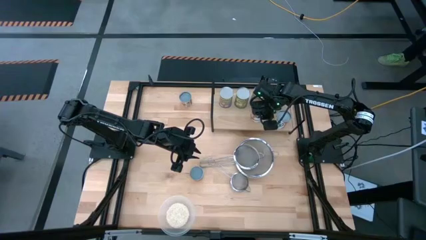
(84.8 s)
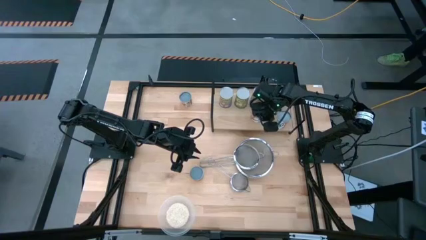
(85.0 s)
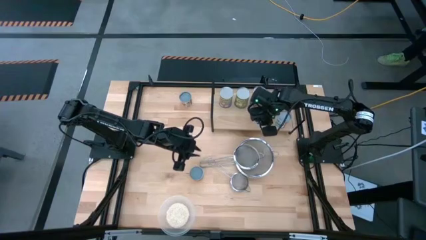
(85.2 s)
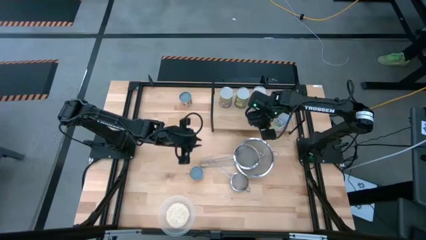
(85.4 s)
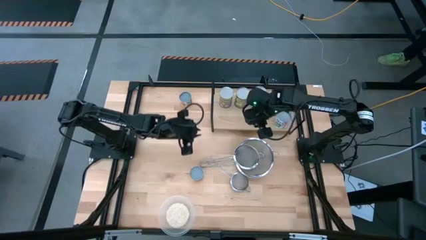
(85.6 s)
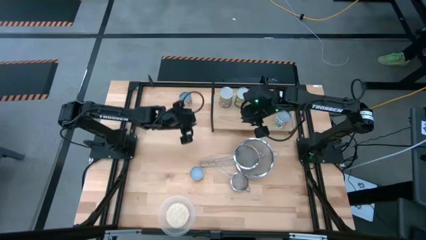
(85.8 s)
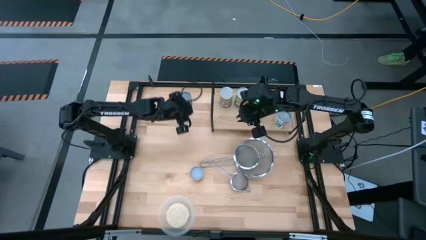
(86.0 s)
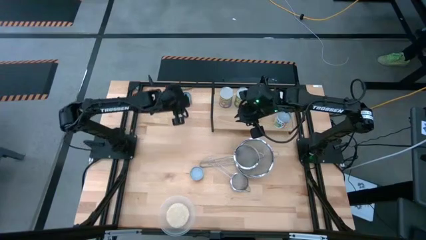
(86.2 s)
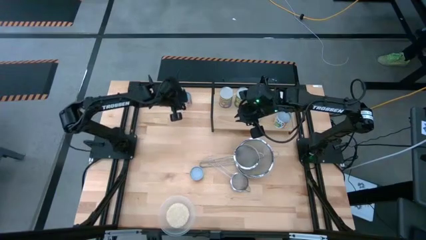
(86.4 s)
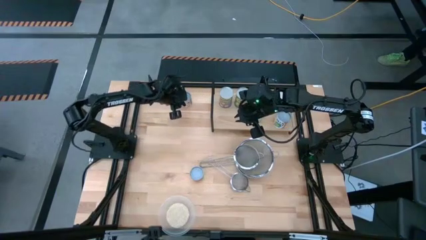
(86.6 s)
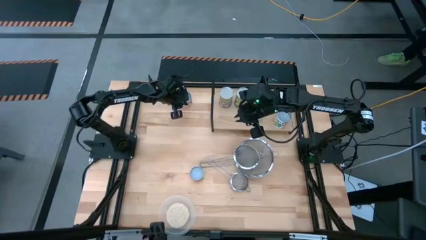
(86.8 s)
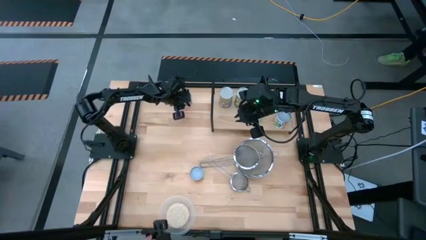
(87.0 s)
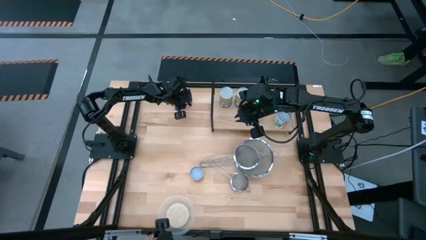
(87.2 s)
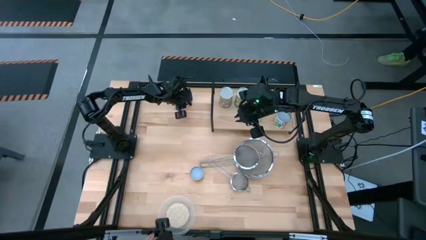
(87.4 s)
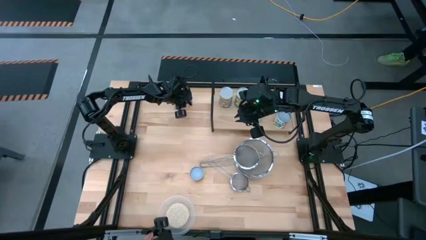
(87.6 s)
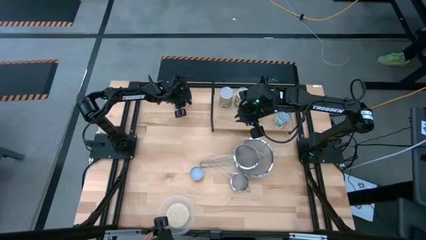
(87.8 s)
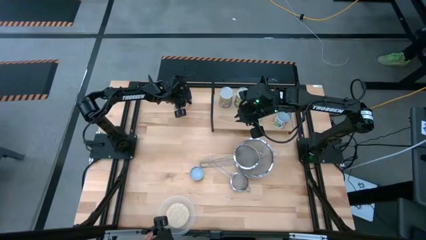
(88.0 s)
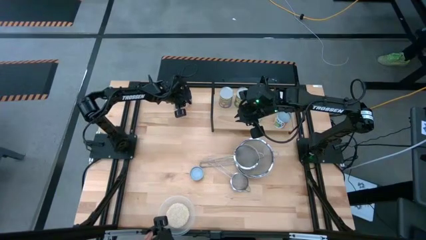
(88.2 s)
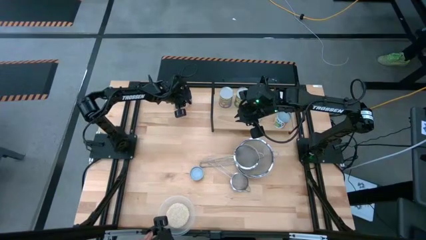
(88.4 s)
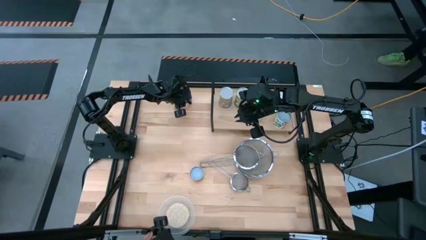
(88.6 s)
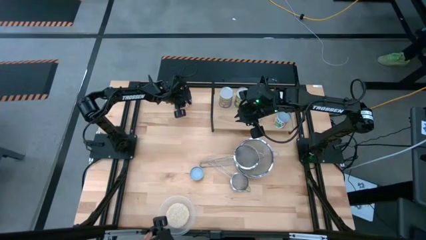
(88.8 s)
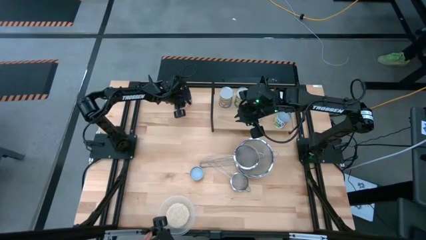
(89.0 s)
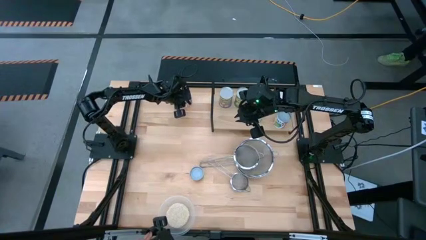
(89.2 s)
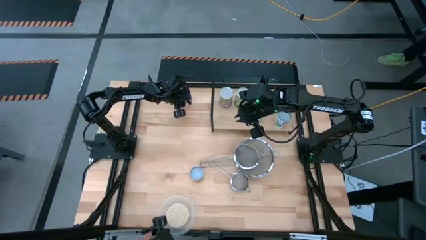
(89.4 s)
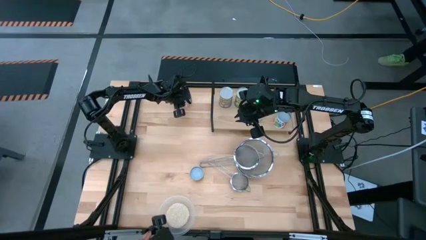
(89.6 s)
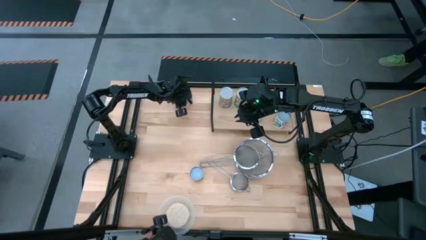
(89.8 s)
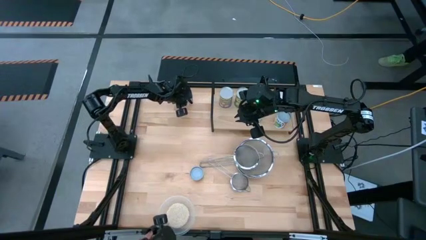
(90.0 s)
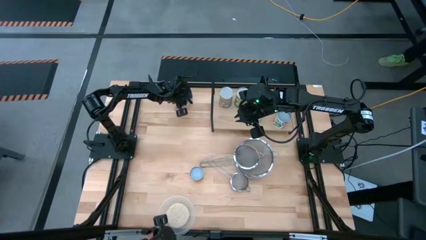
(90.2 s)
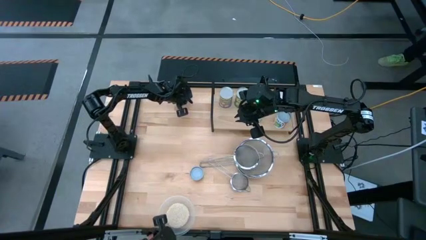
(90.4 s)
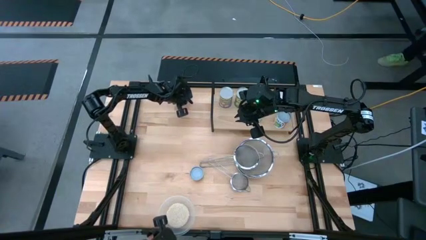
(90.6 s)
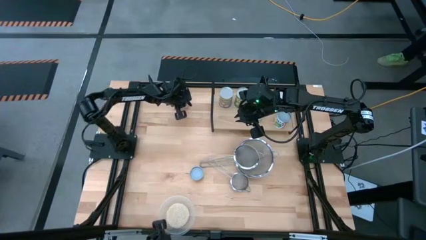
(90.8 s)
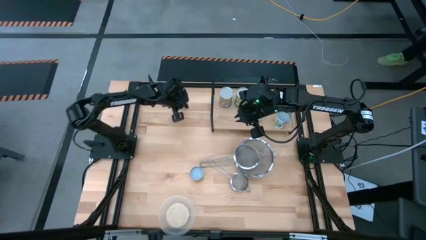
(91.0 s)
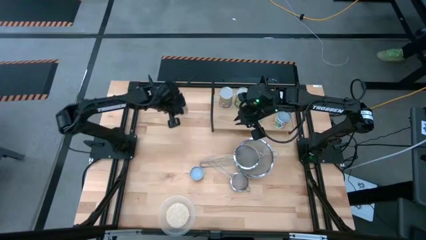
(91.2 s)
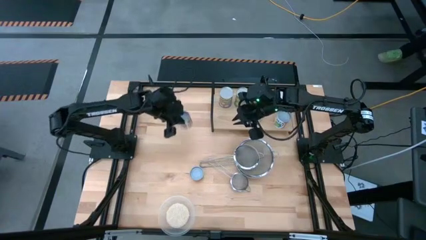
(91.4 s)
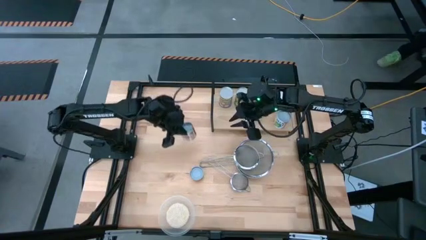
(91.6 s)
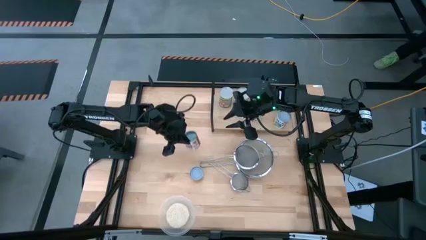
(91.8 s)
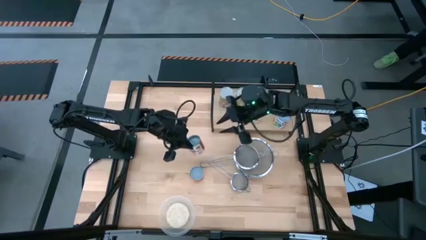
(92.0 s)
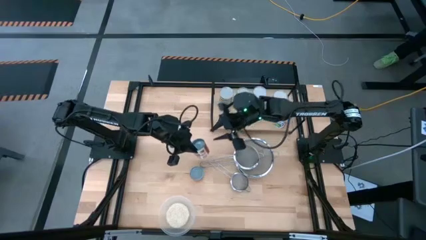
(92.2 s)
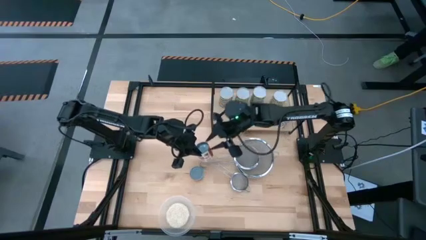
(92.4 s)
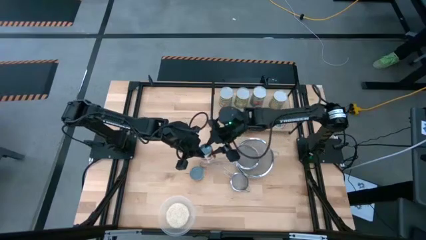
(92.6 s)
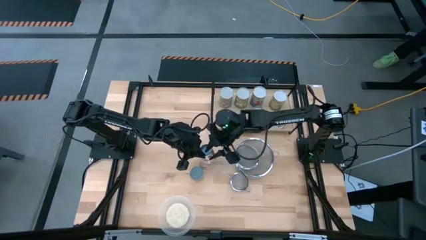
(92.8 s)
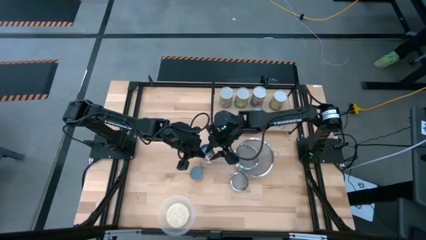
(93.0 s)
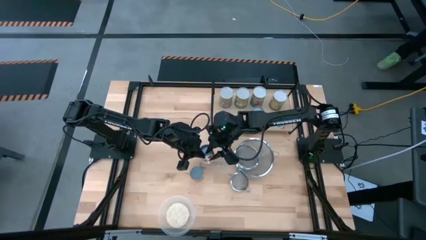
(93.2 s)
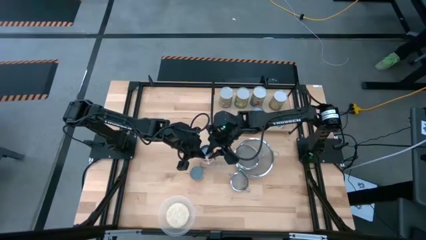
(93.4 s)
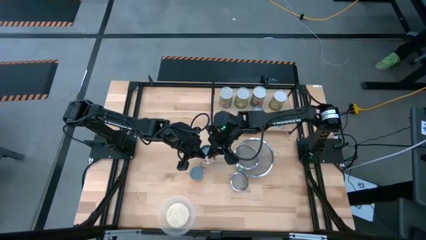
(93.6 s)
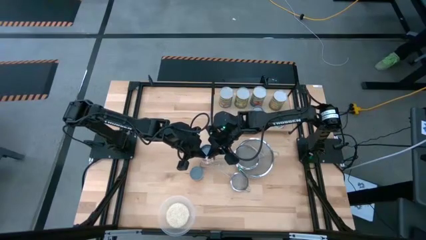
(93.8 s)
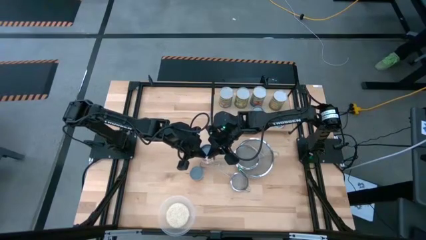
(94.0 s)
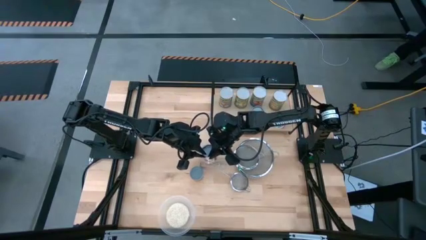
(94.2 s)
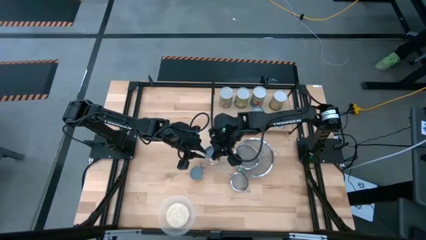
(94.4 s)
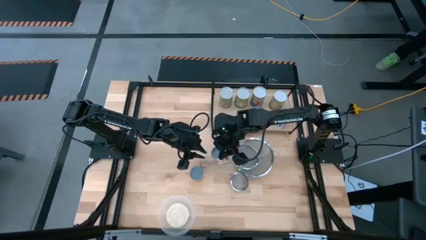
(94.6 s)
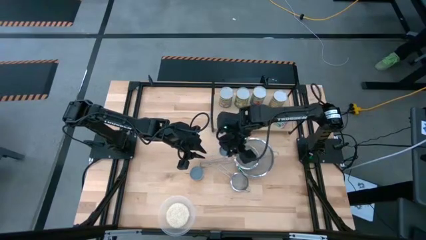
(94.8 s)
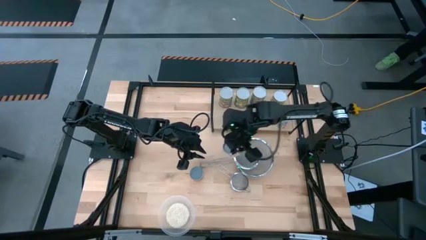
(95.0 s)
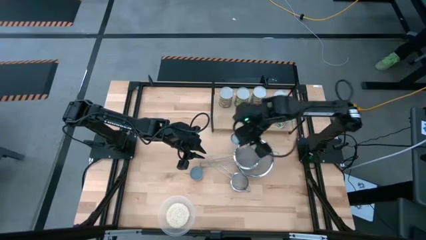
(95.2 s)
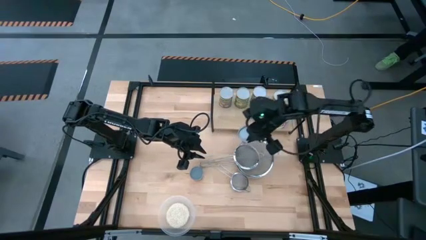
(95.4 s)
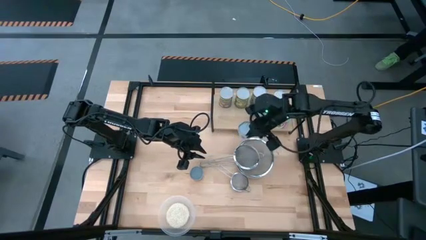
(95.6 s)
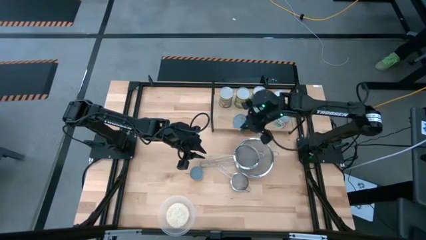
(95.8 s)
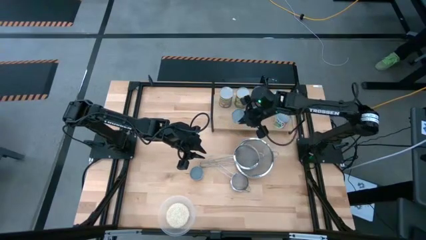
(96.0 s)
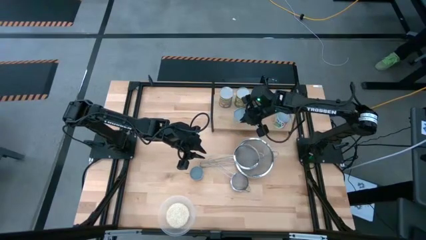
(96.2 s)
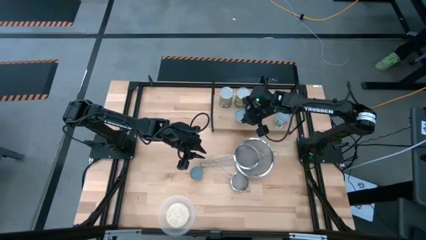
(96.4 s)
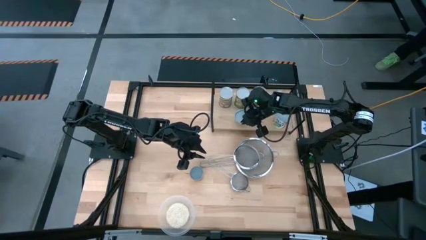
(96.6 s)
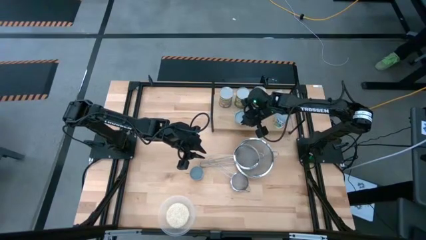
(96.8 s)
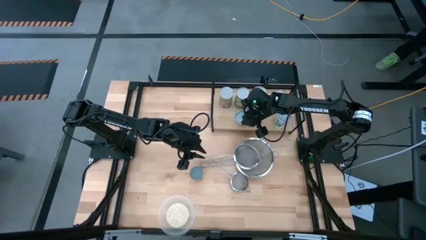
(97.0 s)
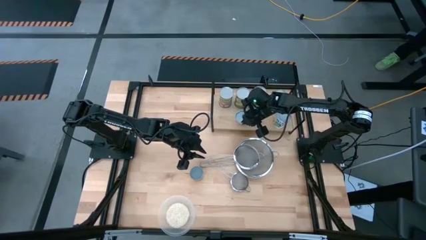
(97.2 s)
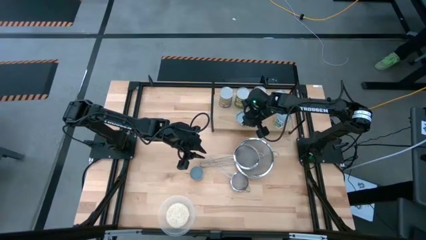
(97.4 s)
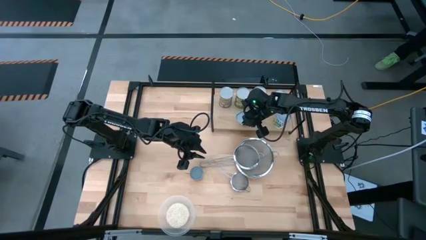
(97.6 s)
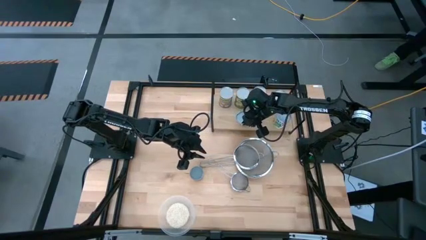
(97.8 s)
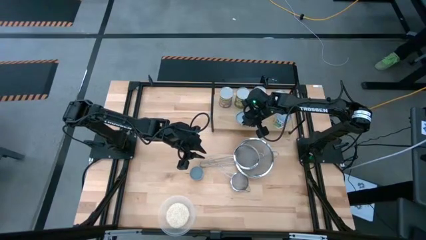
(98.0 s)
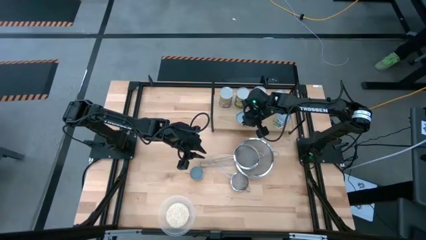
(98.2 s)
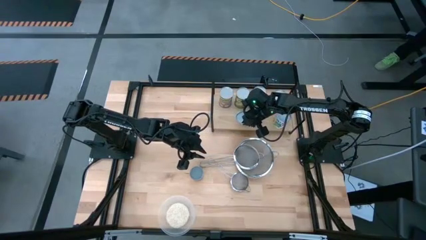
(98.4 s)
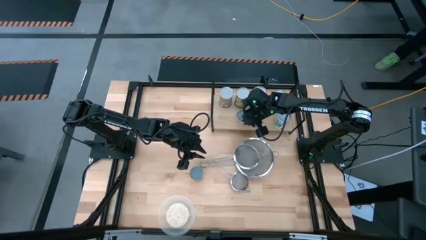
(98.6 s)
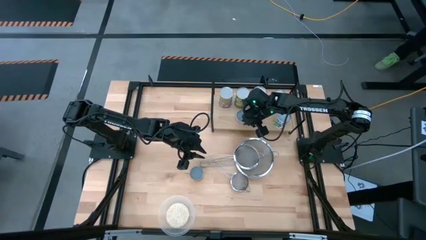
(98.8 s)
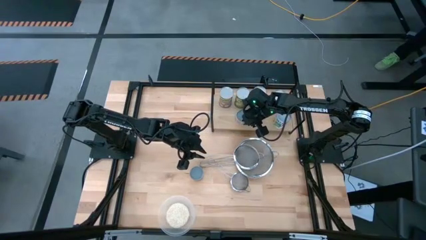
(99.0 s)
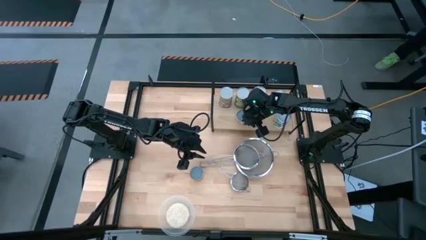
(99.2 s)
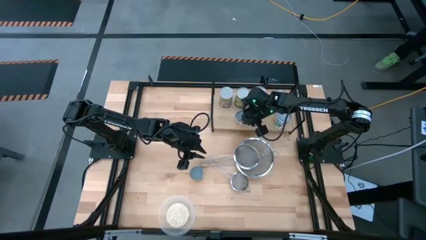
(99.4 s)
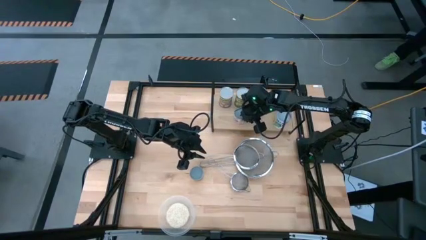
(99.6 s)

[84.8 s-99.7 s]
Task: Pick and place cans onto a shelf
Put the canned diced tomatoes on the shelf

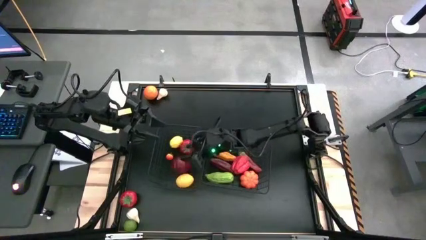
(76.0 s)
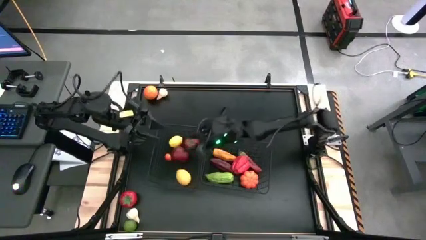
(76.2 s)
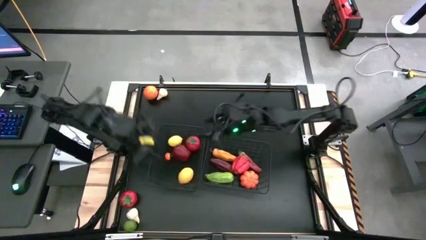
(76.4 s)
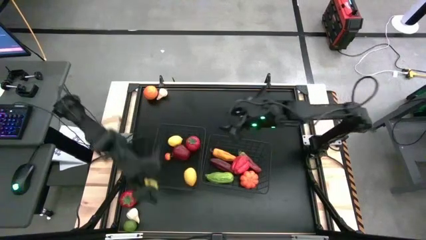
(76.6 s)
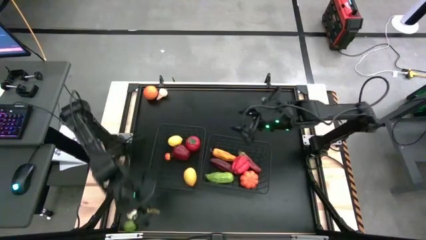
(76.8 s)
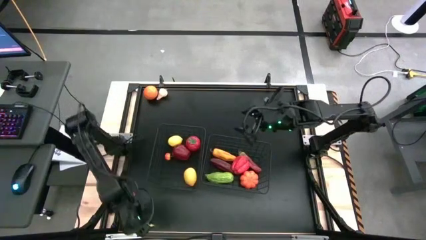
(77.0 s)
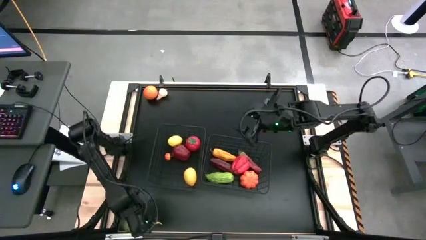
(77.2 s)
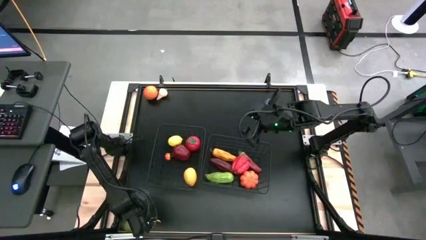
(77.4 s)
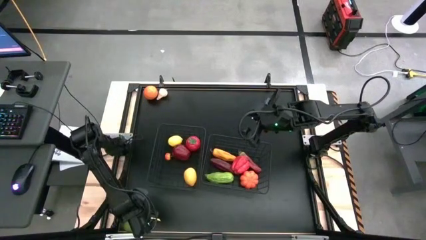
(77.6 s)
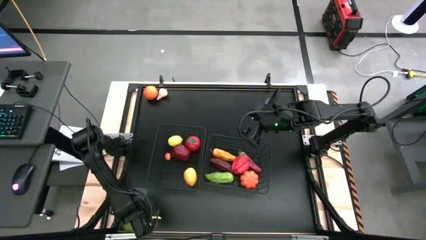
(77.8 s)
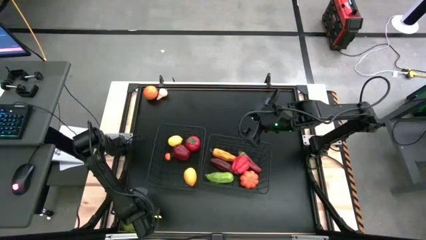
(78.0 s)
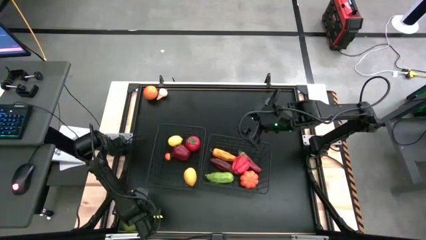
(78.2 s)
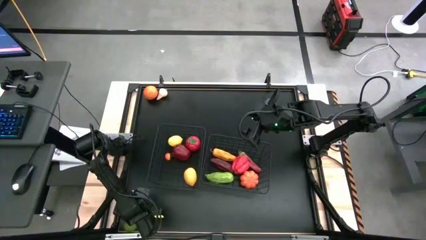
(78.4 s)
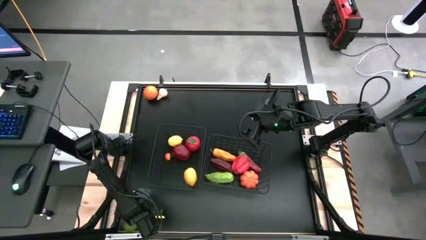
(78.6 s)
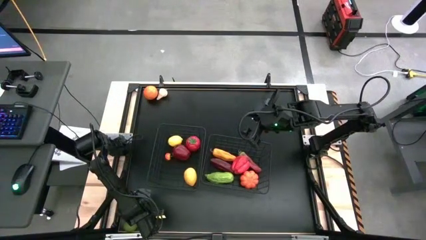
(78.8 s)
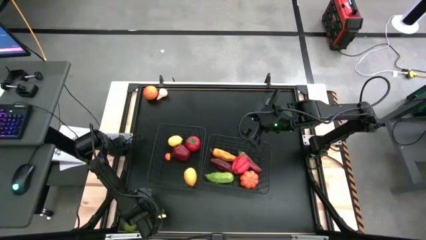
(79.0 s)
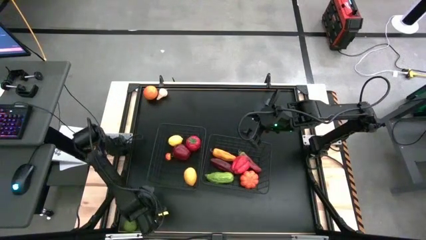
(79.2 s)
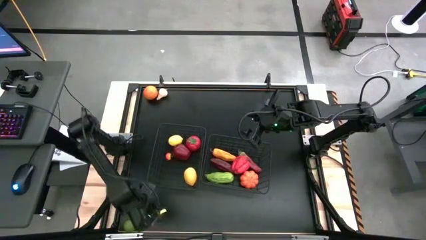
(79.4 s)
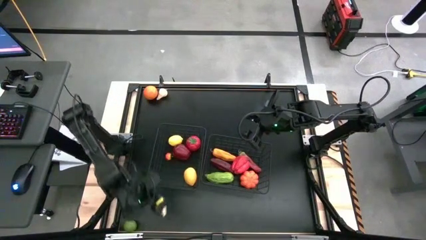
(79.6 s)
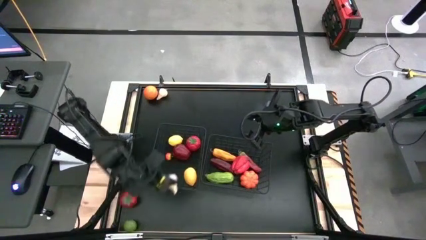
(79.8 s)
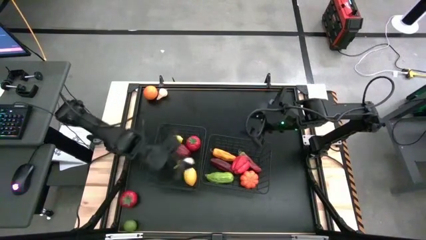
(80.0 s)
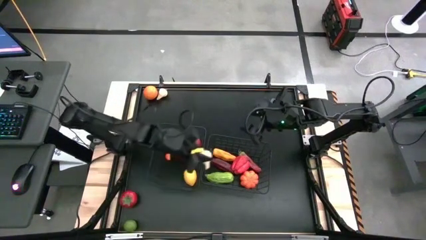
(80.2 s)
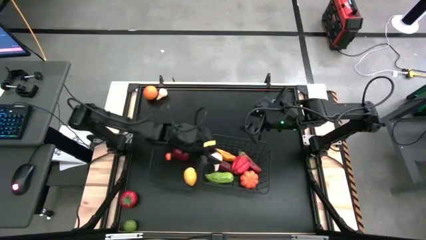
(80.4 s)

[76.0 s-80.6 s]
Task: Sort produce into baskets
Put the bottom white garlic into the right wire basket
